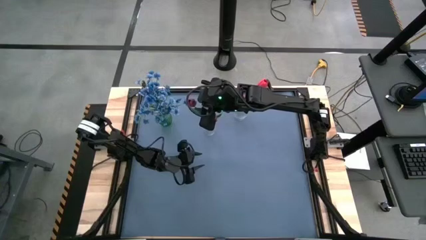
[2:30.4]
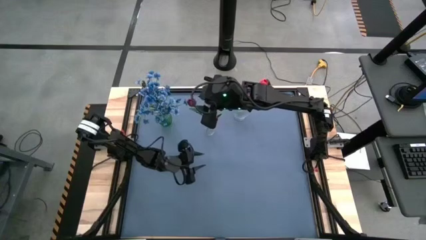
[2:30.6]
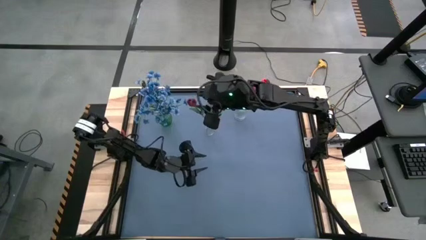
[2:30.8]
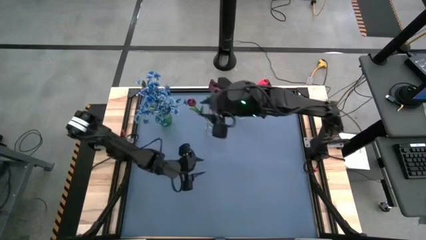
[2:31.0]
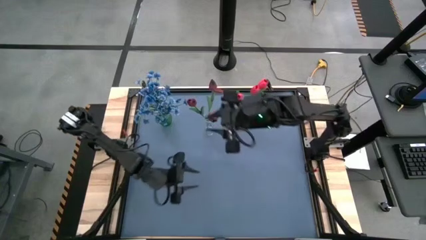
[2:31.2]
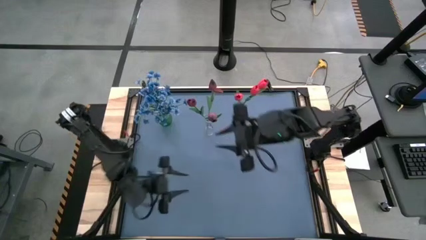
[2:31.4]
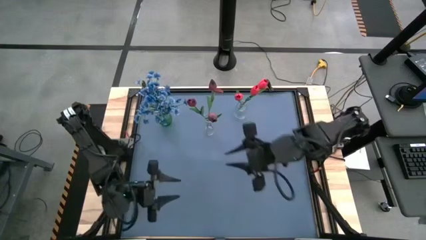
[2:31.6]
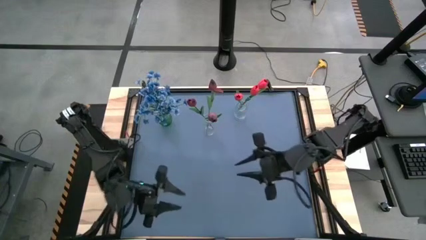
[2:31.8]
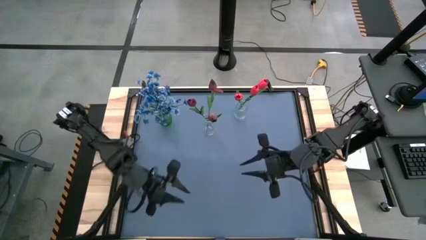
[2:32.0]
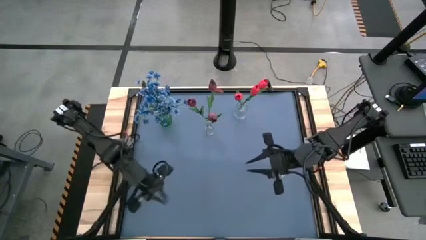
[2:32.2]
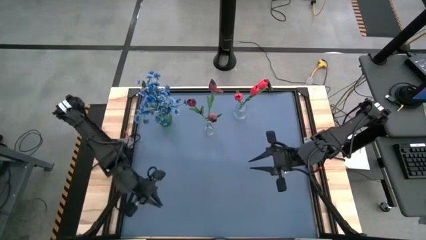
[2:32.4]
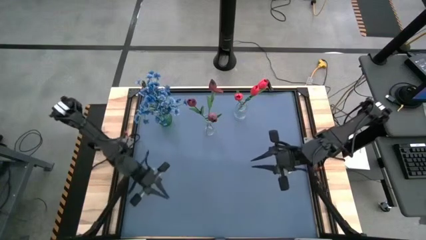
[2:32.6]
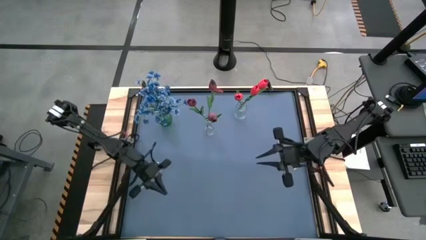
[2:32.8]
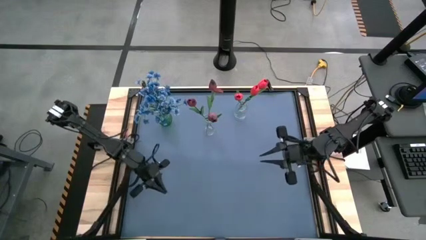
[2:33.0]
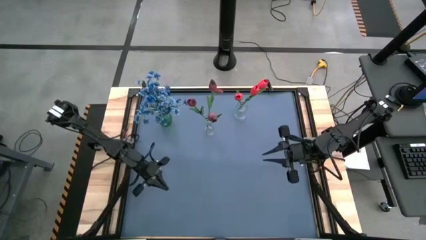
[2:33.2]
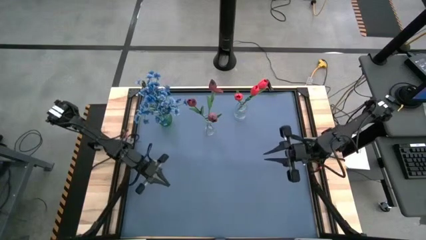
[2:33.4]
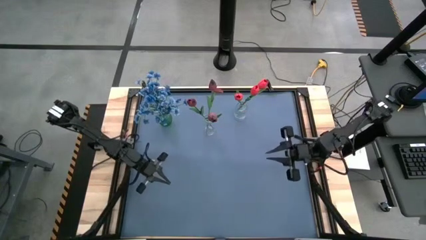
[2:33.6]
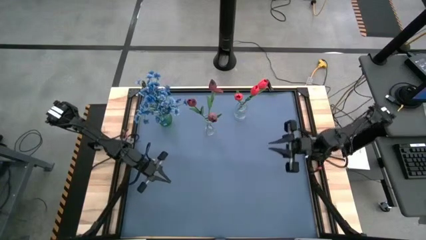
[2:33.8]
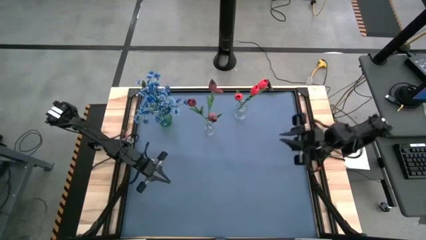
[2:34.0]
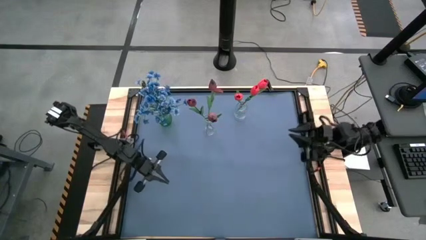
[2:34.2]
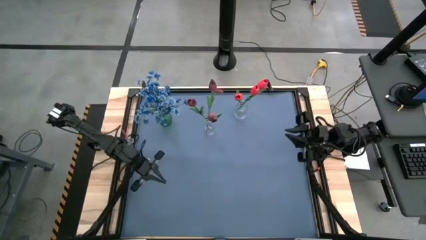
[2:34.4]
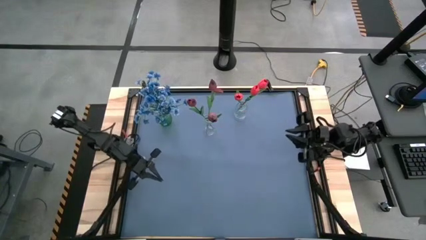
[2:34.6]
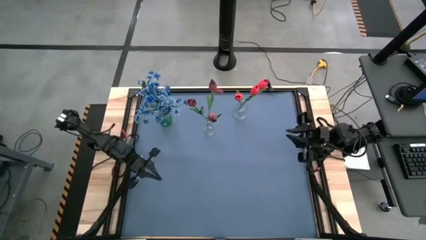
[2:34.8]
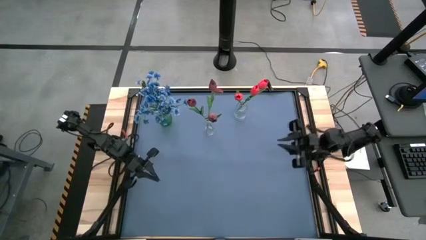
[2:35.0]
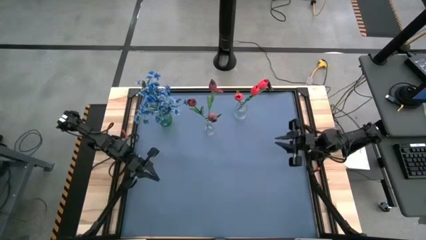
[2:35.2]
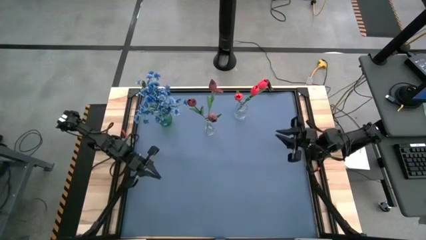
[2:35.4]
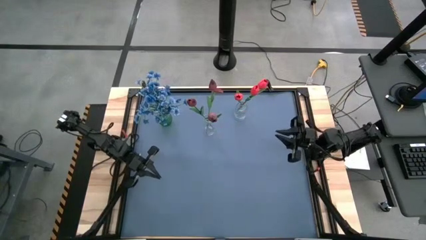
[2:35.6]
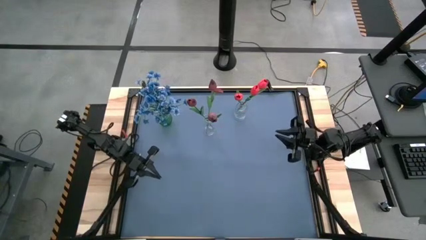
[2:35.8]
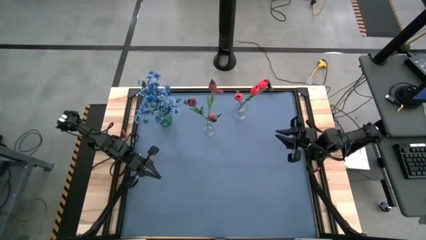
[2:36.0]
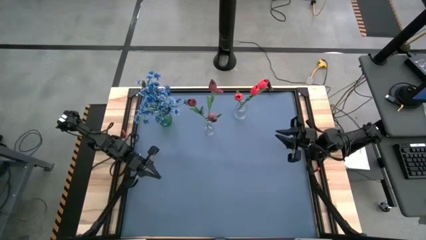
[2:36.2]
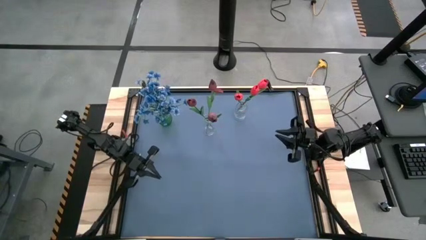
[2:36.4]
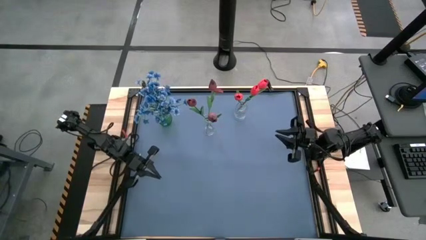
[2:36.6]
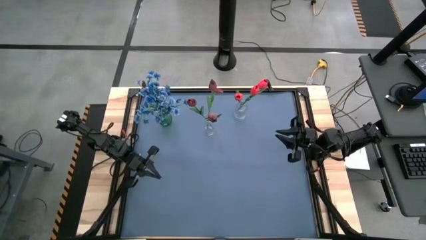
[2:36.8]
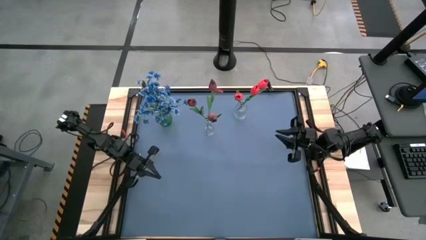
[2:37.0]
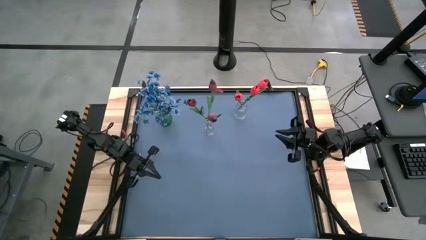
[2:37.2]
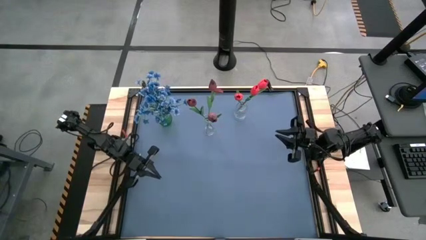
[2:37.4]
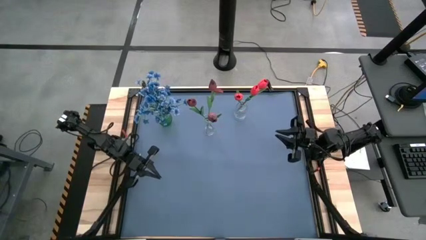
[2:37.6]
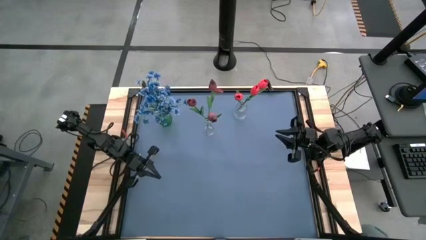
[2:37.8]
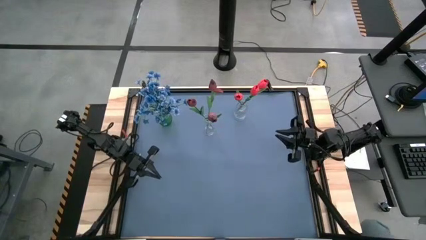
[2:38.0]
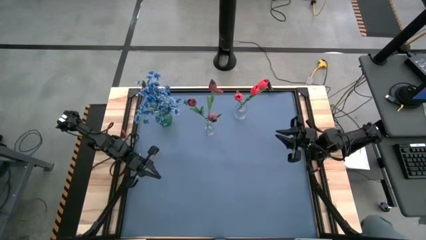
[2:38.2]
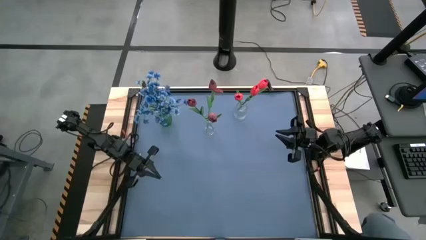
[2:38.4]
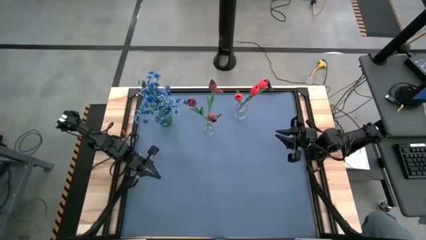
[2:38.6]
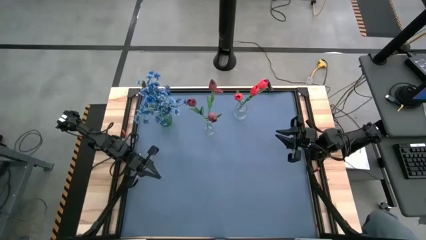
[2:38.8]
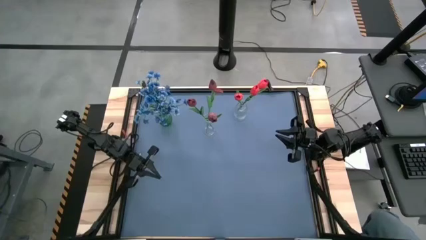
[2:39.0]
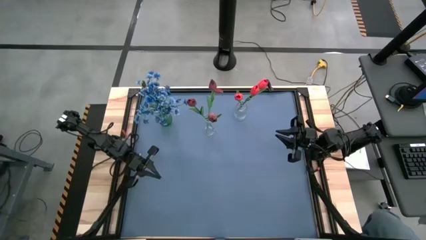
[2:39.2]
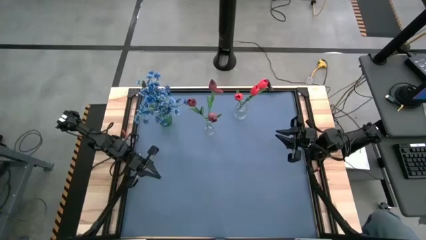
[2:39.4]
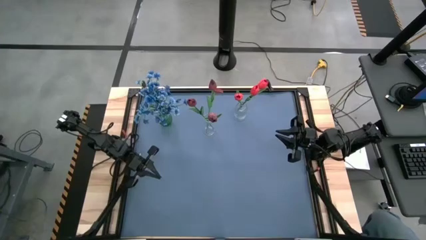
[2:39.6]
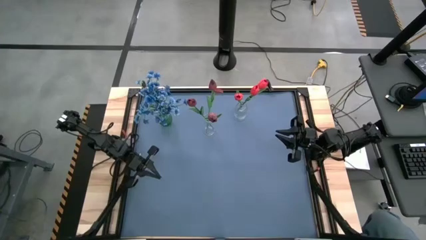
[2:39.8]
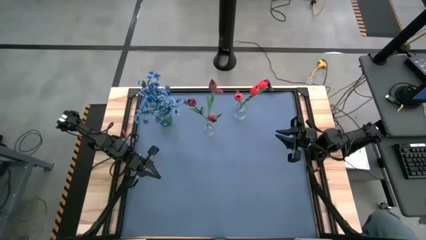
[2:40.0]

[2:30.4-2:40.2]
Task: Sort flowers into vase by color
Return to Home Position
